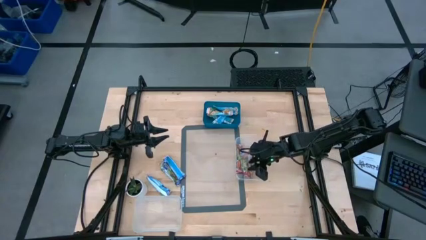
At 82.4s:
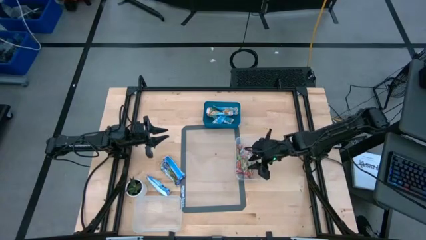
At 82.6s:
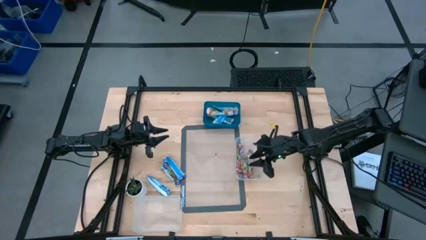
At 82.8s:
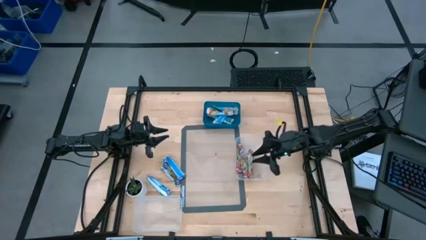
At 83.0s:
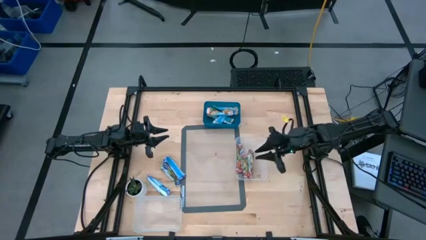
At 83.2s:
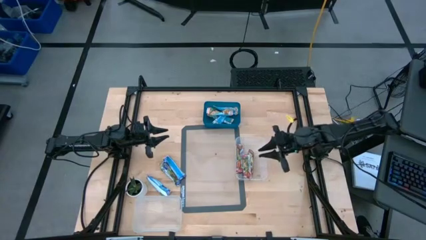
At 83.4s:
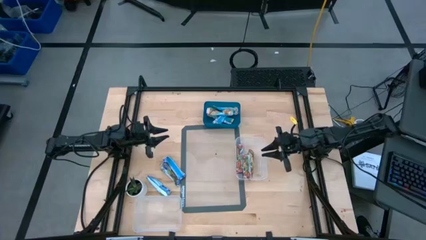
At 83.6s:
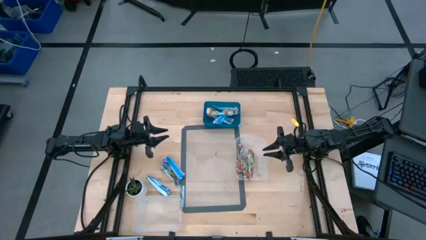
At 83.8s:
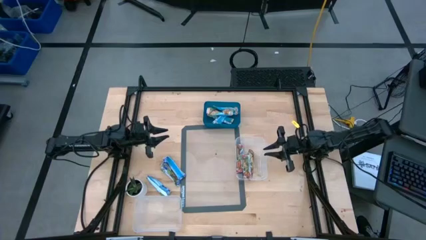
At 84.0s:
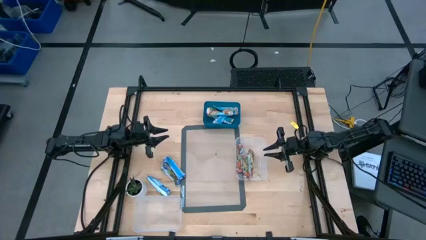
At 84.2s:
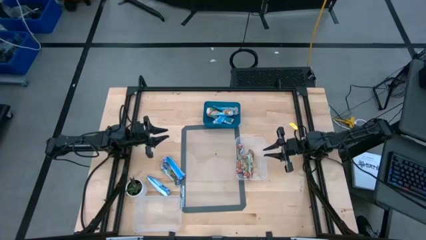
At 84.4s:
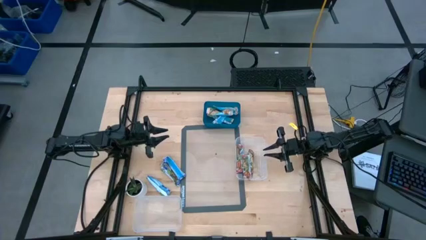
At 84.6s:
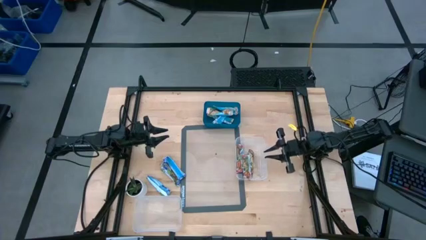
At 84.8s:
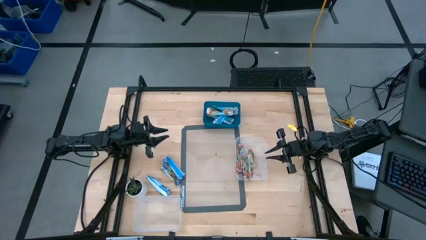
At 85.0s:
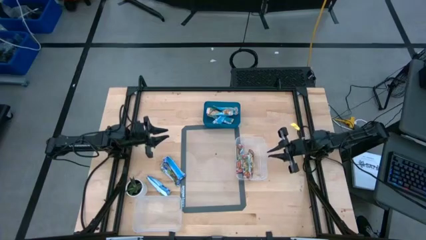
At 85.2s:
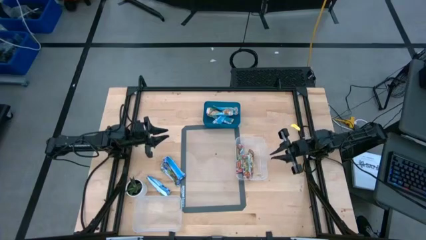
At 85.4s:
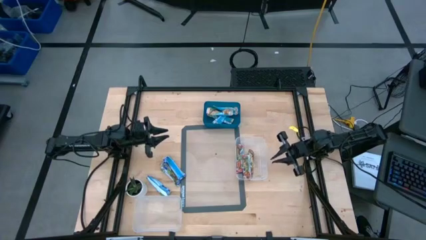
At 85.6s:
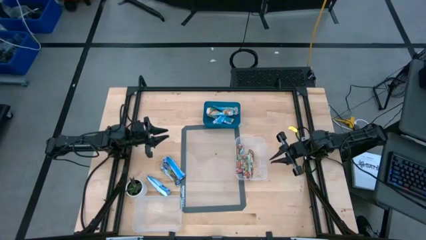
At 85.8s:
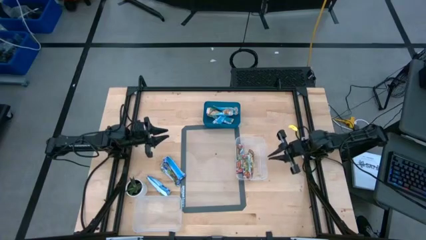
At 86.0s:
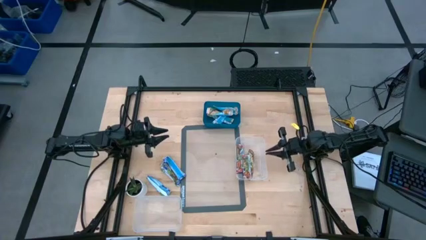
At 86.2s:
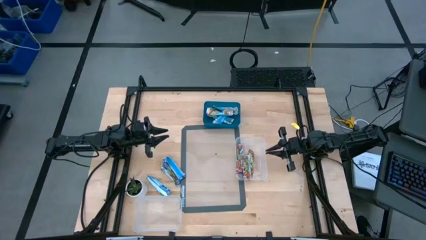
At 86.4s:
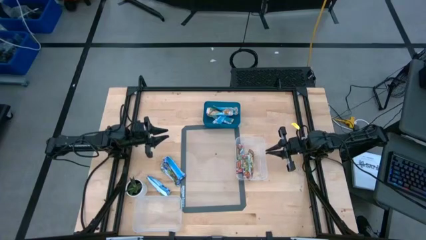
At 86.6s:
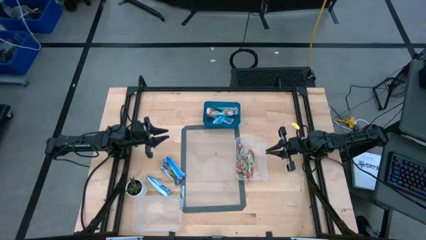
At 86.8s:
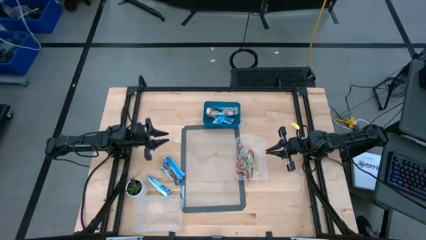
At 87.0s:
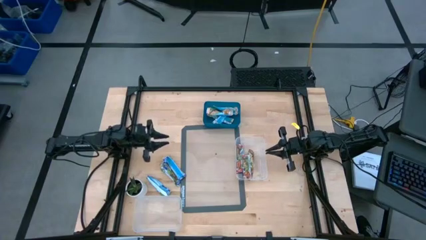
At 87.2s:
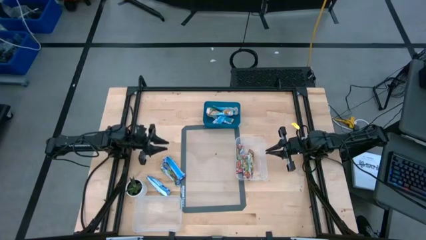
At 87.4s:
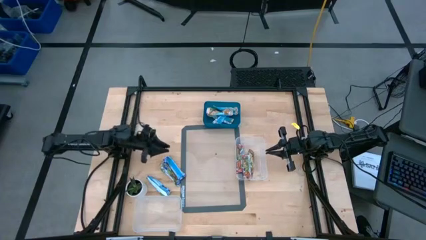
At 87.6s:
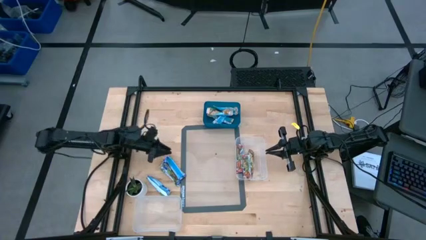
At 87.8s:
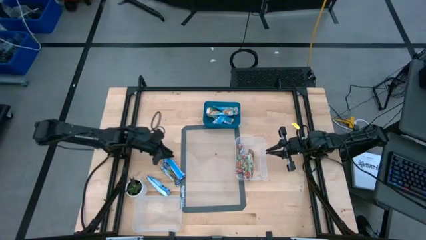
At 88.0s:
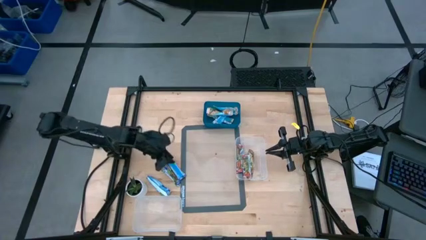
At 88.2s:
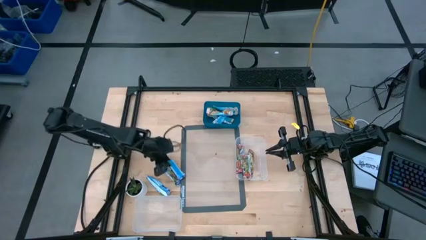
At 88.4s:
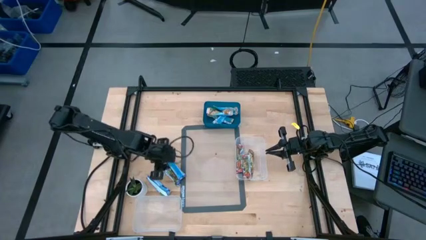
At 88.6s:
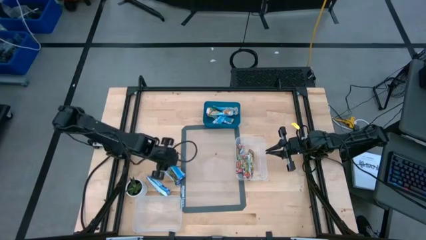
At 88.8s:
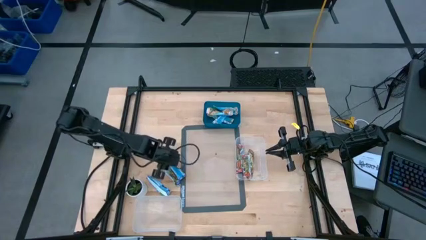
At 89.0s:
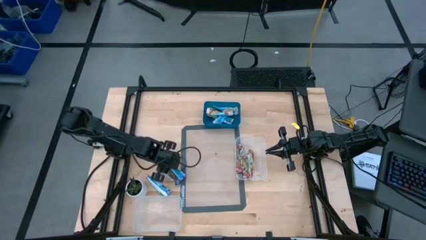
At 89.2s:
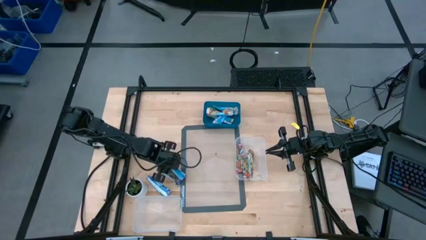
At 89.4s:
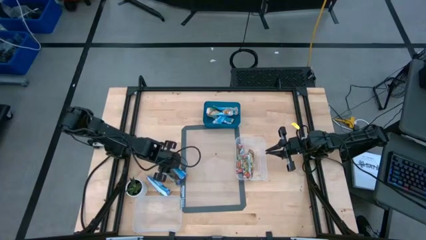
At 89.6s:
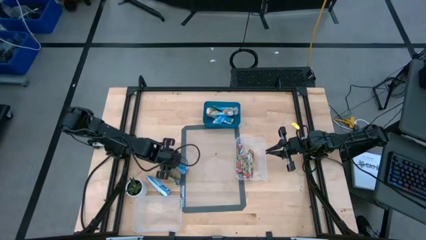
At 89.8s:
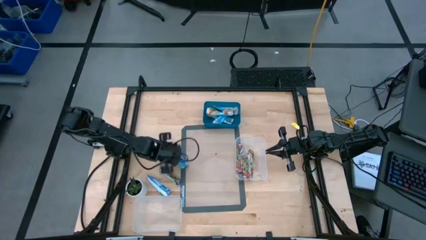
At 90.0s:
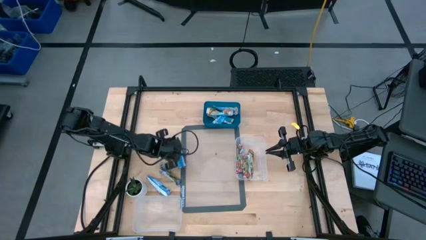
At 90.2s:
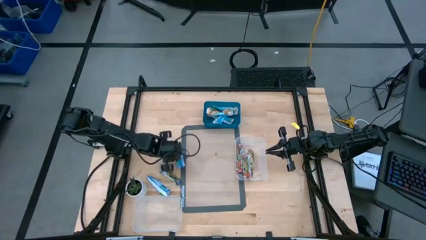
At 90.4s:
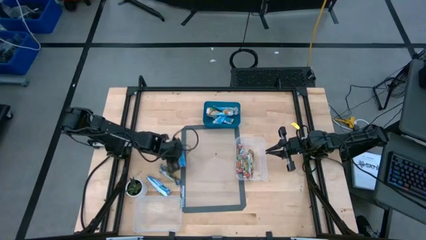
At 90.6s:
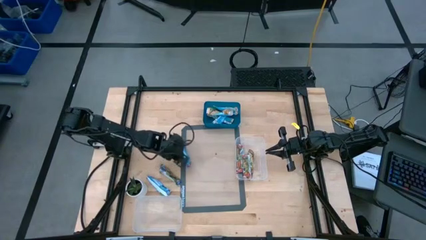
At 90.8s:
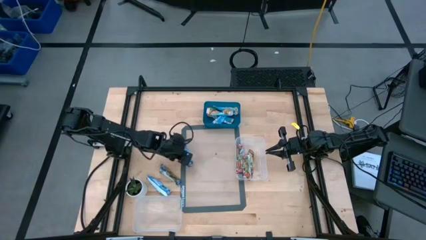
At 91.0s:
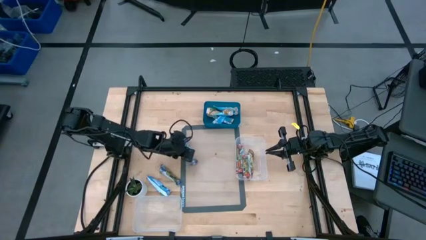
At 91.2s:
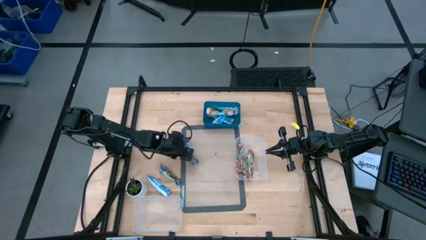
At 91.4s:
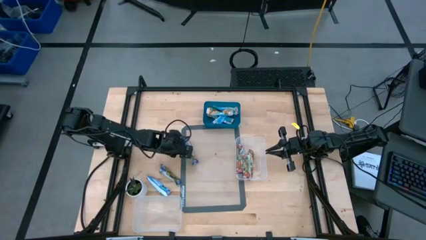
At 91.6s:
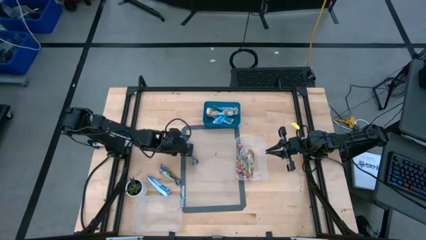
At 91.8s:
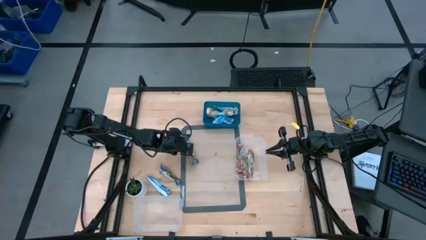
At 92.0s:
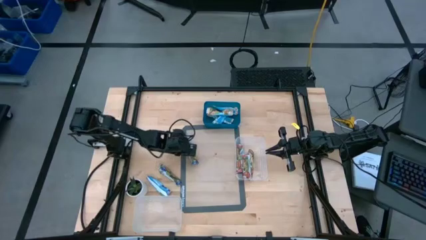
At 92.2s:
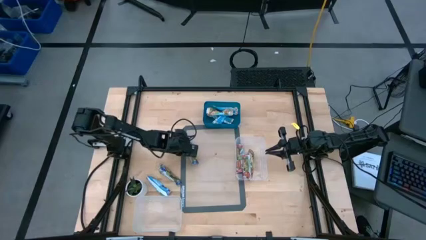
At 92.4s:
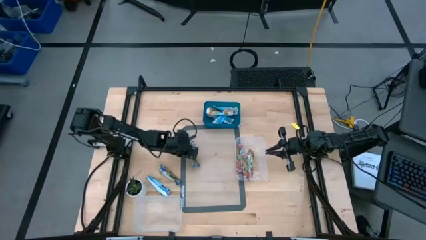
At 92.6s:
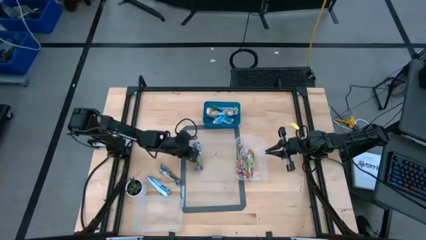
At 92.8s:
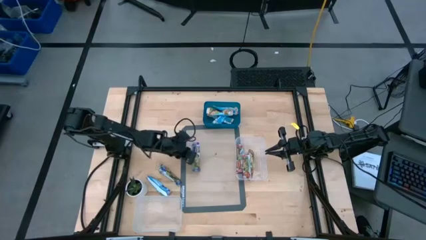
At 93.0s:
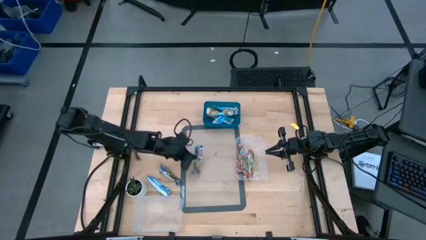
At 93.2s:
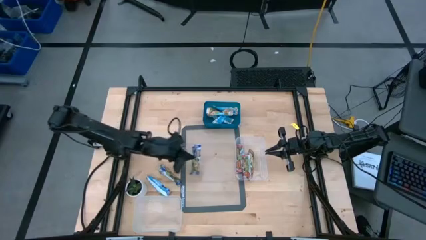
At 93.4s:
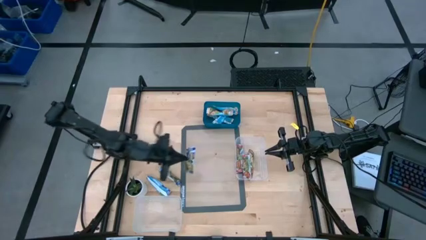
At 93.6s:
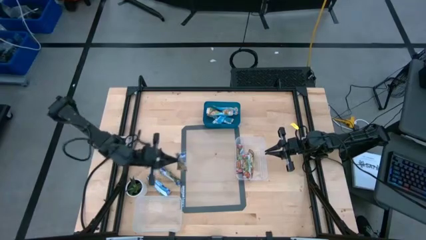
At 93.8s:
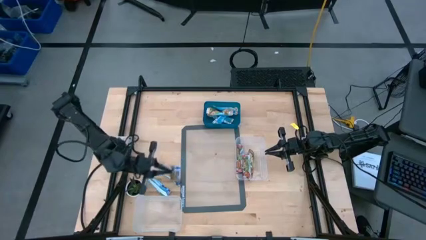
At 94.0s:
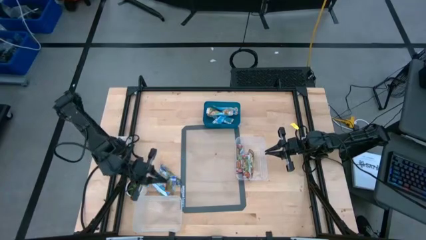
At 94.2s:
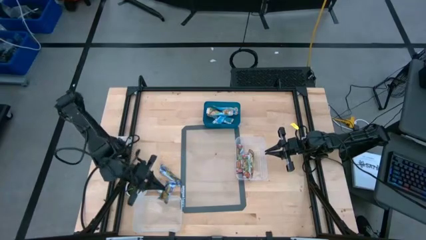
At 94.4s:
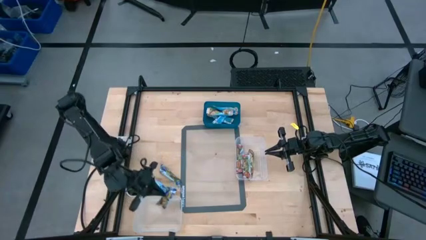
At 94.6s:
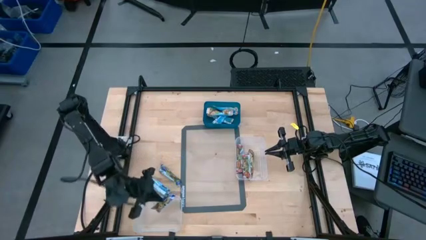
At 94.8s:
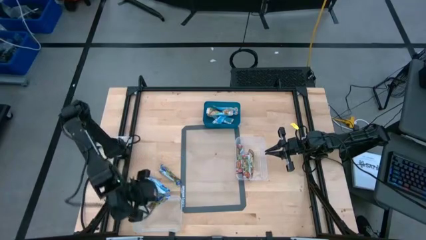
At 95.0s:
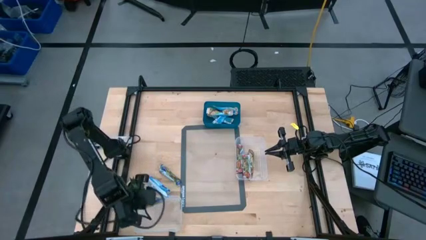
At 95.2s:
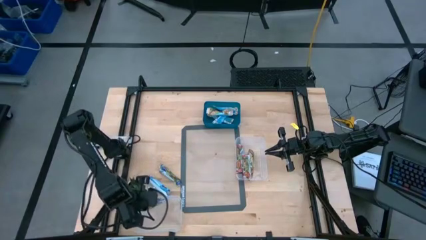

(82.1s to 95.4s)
Task: Pick and place Granola Bars by type
Put the purple granola bar into the left transparent bin

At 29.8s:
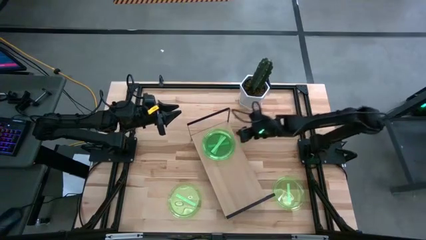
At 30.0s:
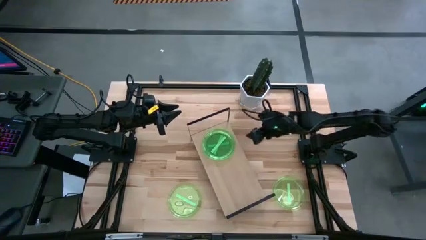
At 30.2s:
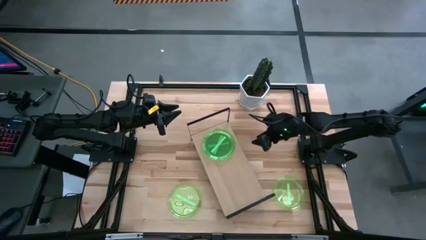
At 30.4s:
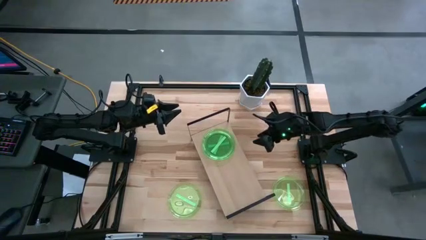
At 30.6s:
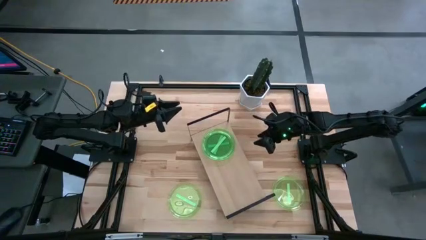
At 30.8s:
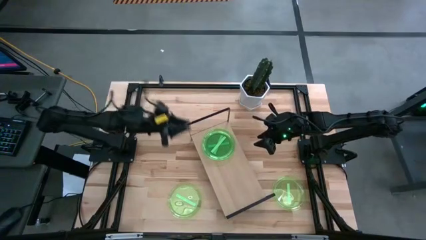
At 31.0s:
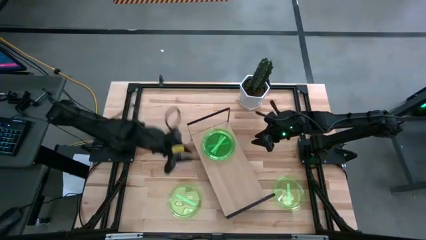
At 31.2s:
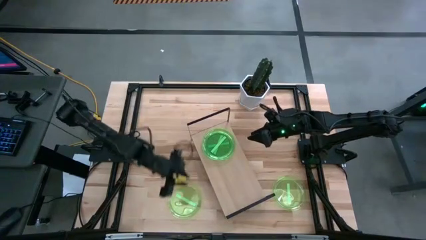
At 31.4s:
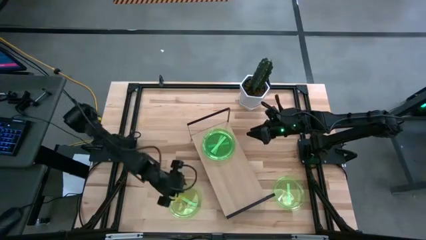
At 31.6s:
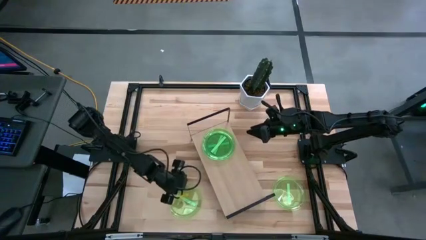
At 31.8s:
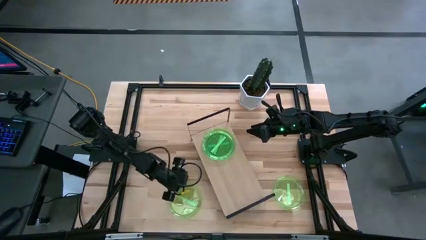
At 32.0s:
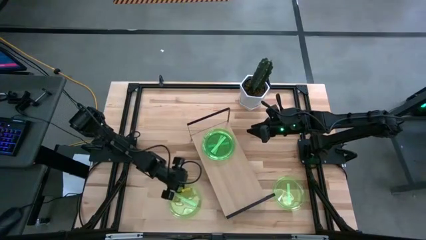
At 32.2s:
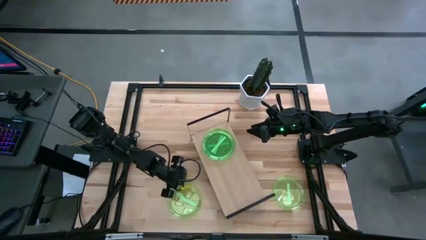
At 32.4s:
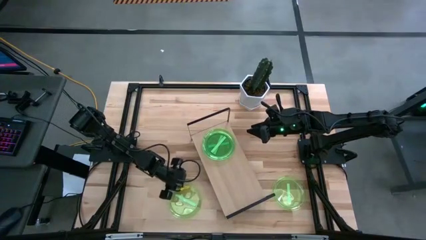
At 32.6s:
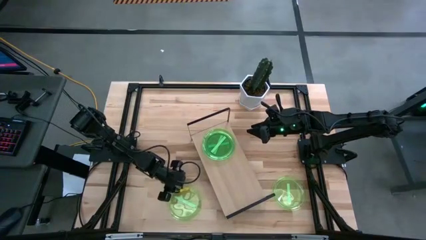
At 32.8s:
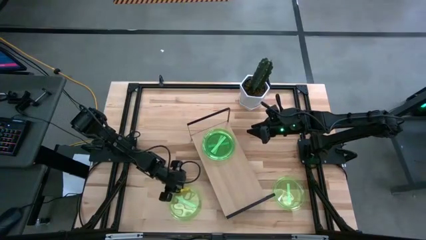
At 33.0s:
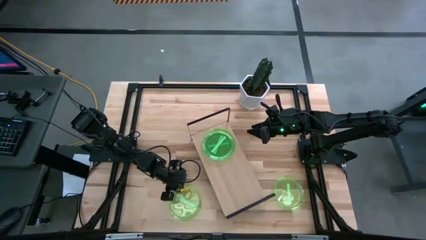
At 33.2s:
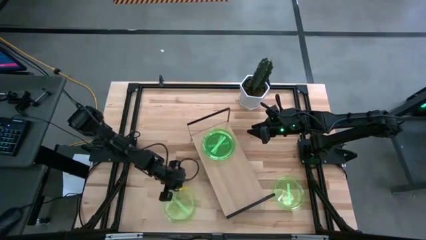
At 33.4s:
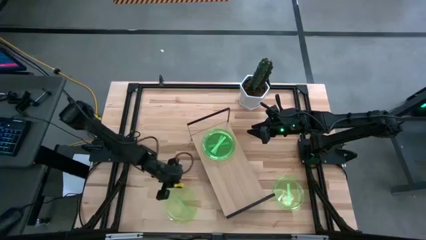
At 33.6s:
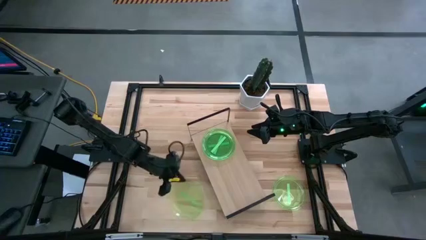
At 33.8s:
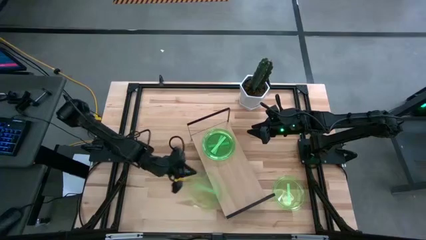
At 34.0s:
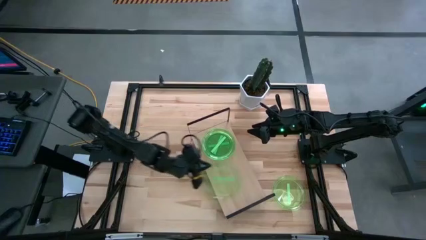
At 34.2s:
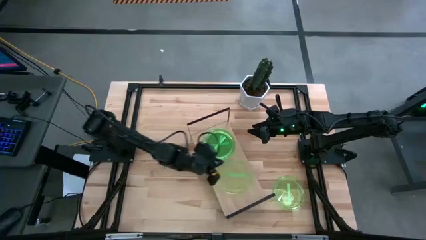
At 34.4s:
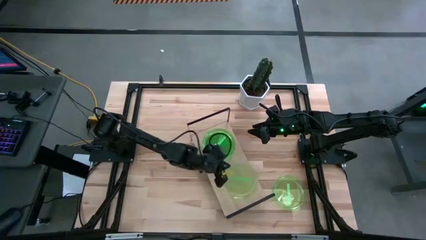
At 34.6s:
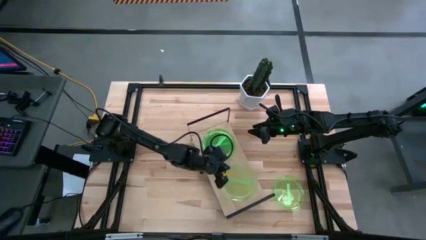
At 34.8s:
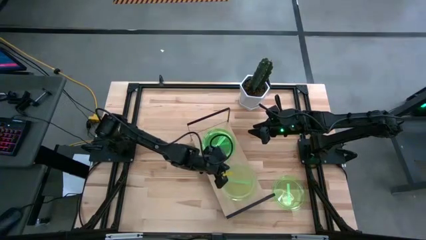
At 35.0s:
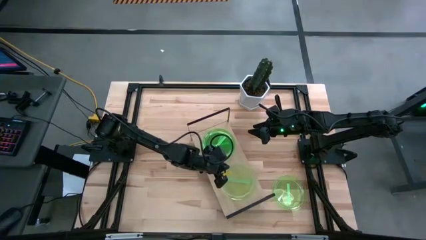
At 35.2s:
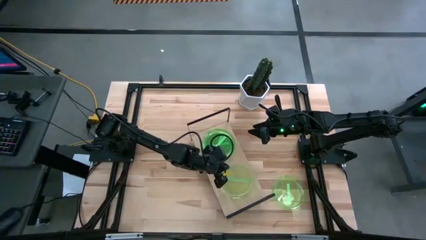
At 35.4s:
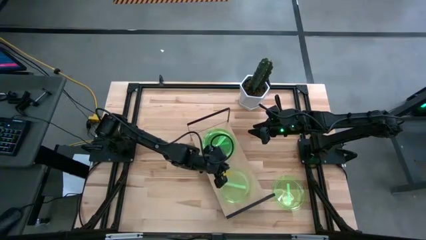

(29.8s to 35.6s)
Task: Place and stack plates onto a shelf
Put the left green plate on the shelf
